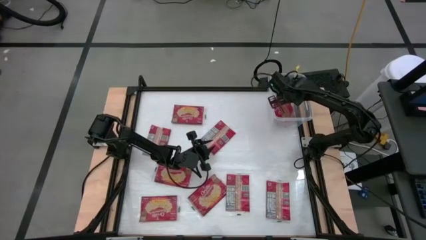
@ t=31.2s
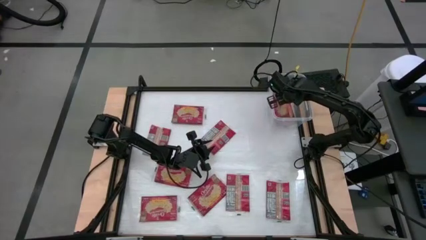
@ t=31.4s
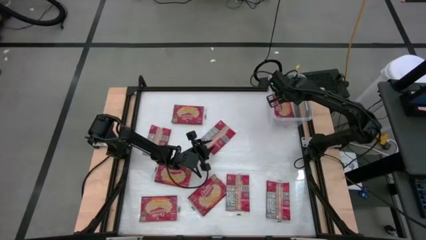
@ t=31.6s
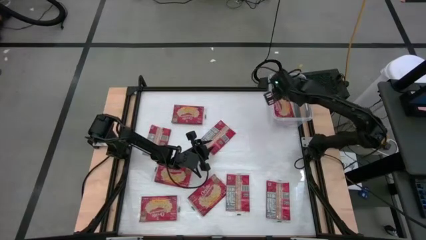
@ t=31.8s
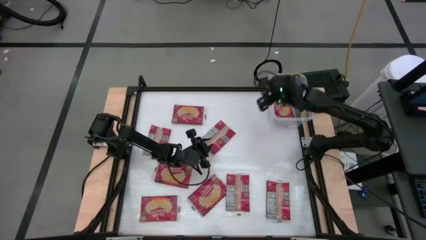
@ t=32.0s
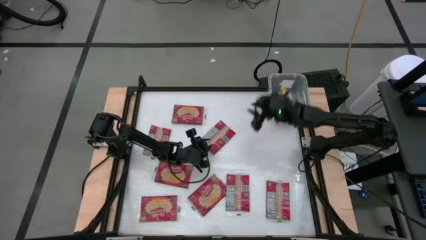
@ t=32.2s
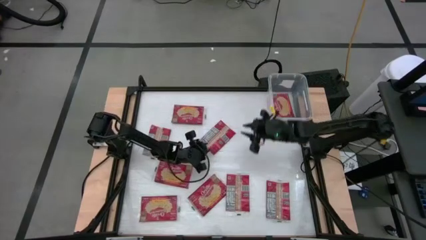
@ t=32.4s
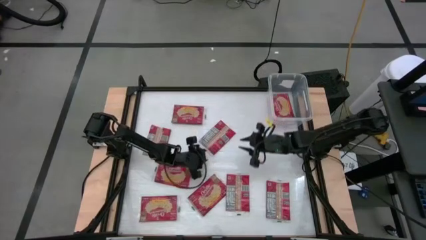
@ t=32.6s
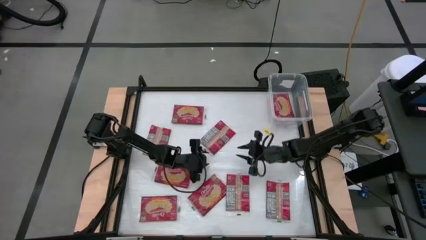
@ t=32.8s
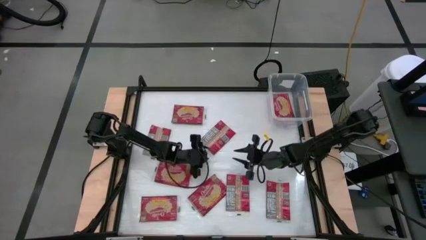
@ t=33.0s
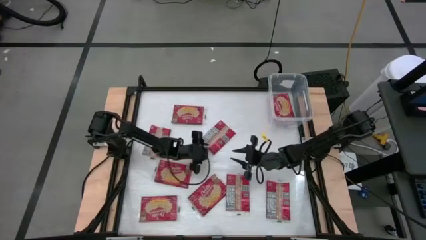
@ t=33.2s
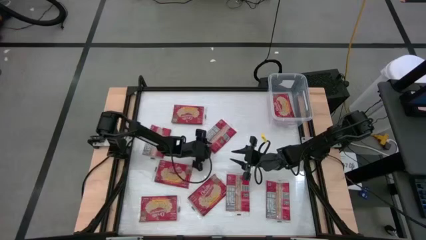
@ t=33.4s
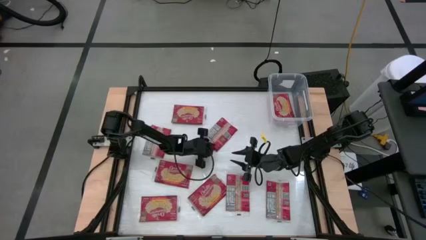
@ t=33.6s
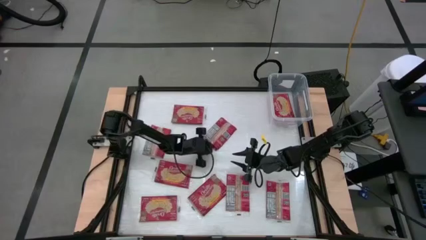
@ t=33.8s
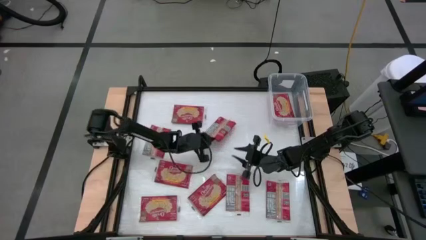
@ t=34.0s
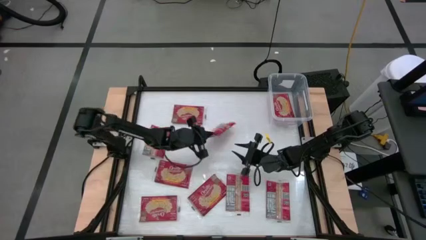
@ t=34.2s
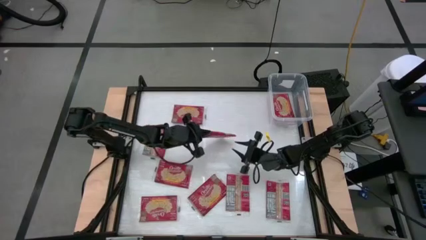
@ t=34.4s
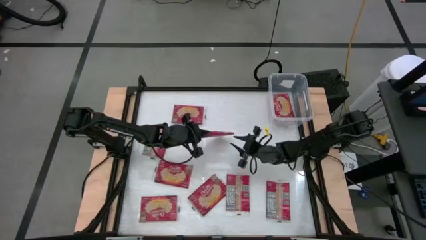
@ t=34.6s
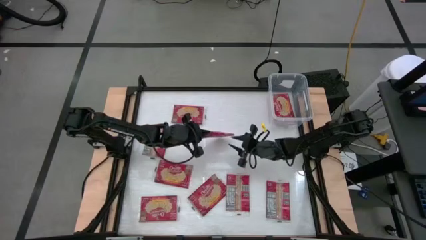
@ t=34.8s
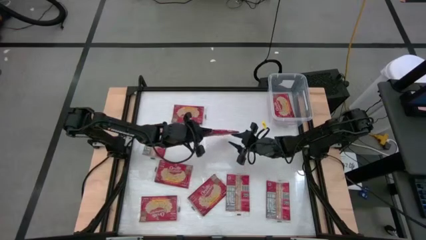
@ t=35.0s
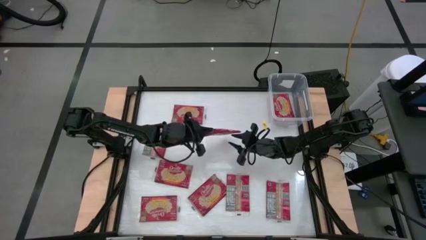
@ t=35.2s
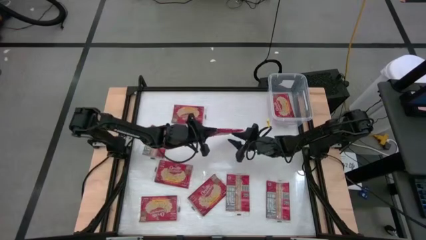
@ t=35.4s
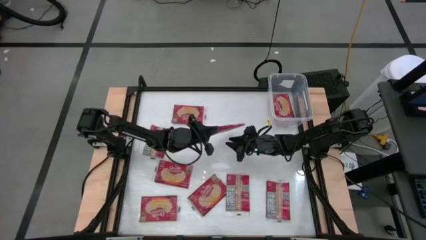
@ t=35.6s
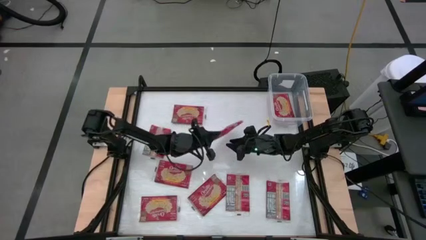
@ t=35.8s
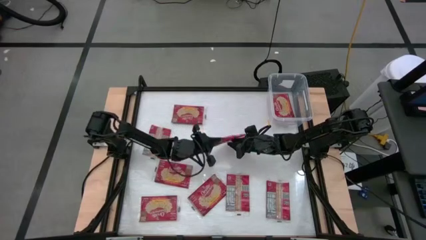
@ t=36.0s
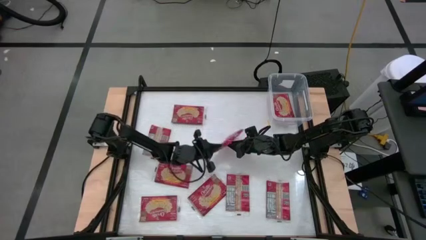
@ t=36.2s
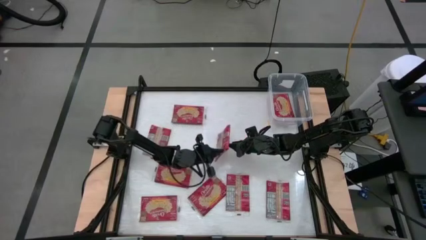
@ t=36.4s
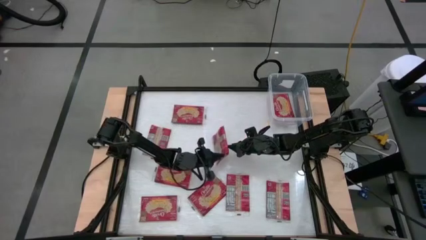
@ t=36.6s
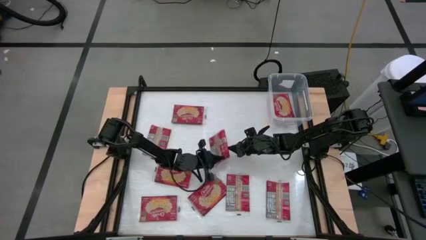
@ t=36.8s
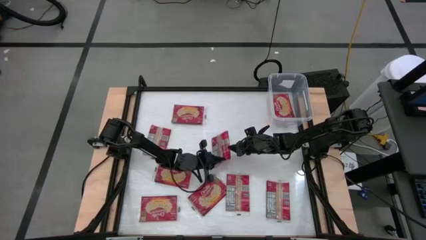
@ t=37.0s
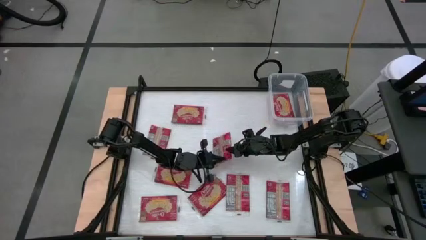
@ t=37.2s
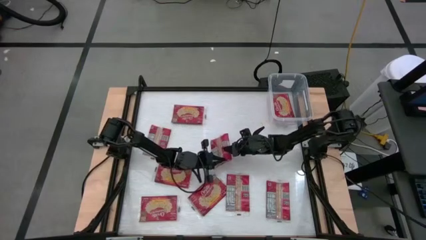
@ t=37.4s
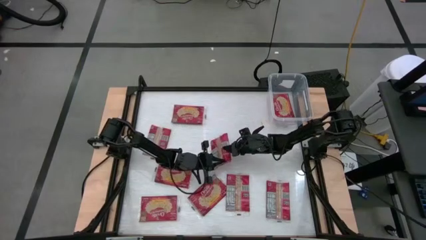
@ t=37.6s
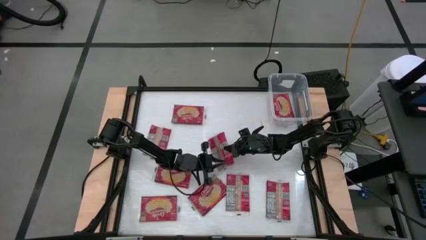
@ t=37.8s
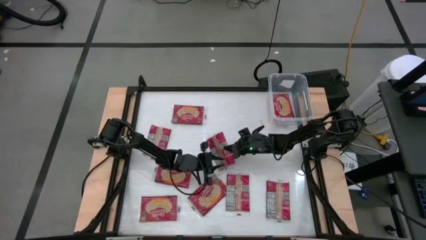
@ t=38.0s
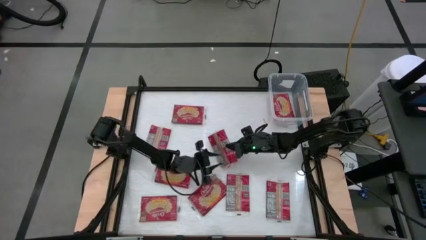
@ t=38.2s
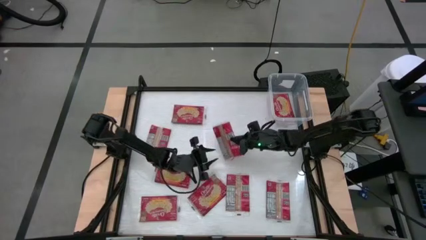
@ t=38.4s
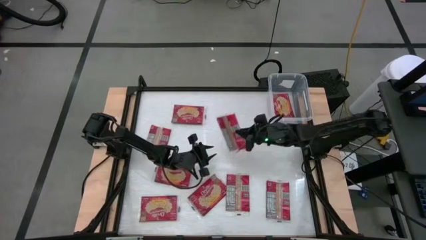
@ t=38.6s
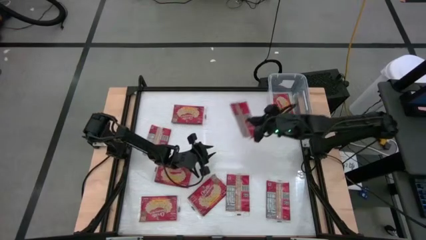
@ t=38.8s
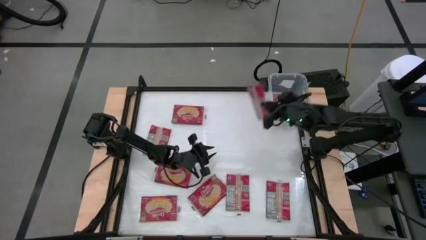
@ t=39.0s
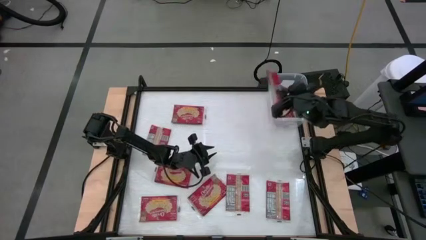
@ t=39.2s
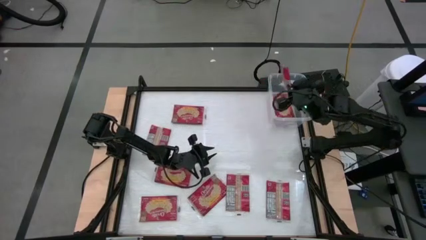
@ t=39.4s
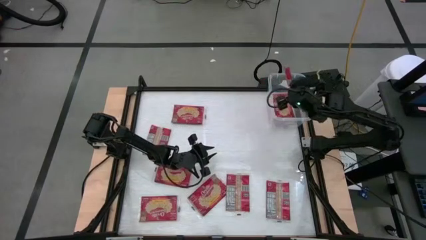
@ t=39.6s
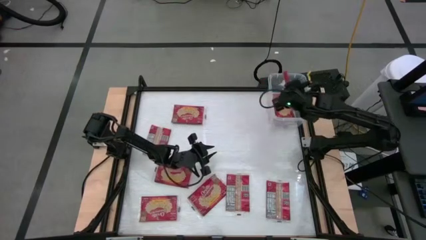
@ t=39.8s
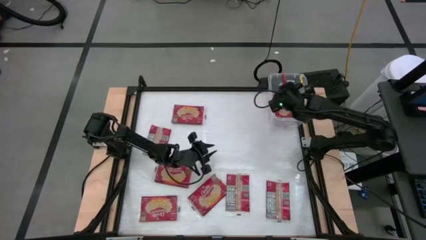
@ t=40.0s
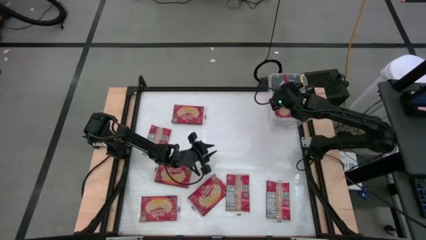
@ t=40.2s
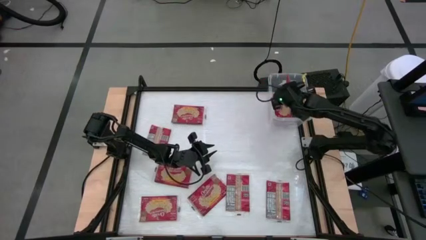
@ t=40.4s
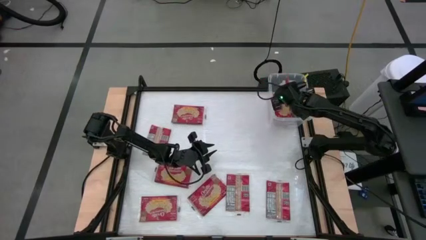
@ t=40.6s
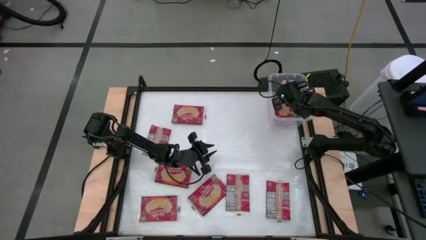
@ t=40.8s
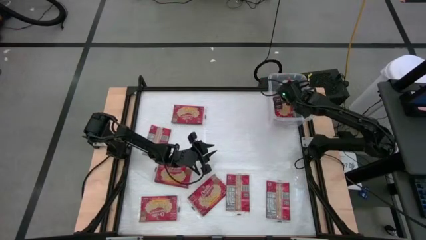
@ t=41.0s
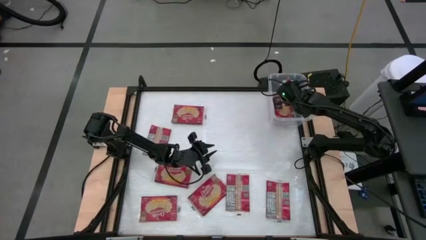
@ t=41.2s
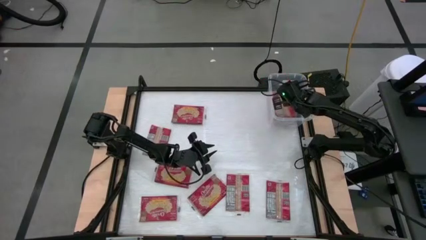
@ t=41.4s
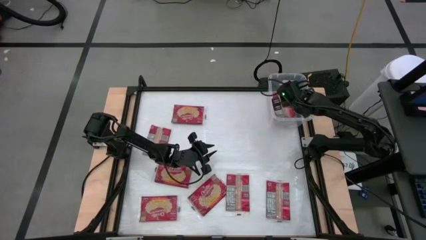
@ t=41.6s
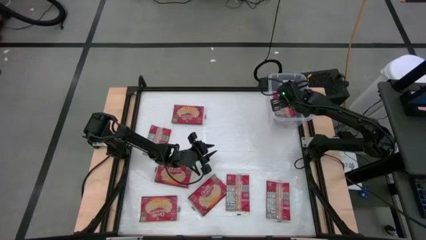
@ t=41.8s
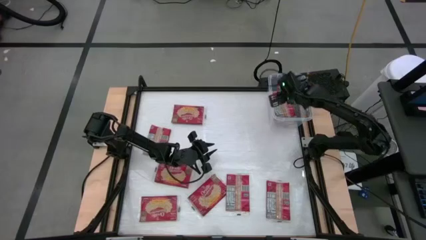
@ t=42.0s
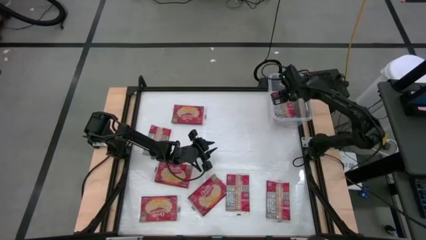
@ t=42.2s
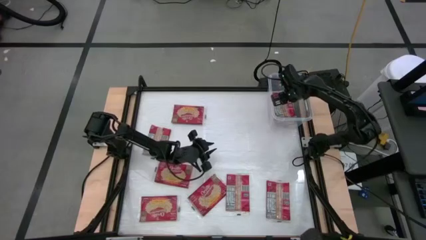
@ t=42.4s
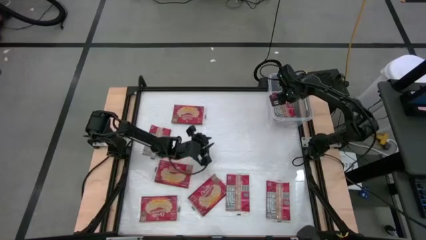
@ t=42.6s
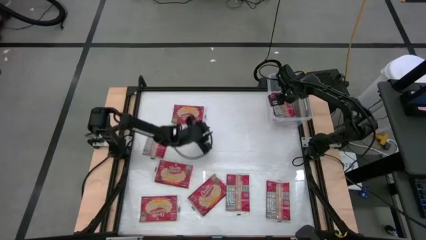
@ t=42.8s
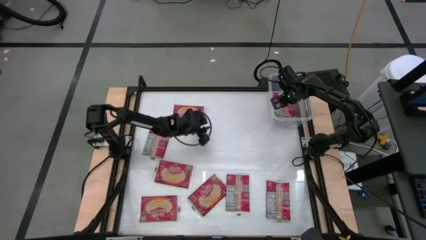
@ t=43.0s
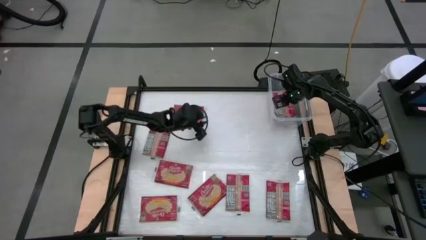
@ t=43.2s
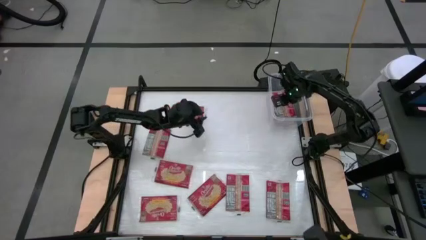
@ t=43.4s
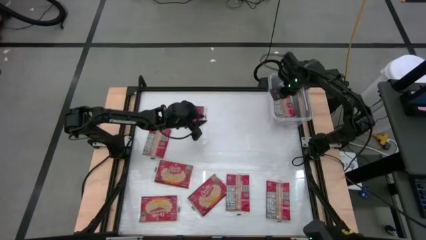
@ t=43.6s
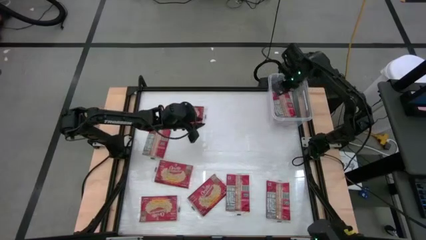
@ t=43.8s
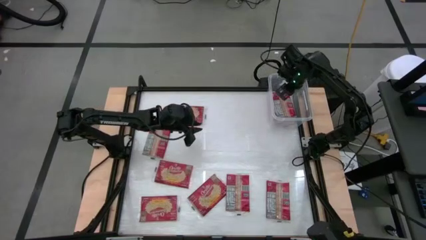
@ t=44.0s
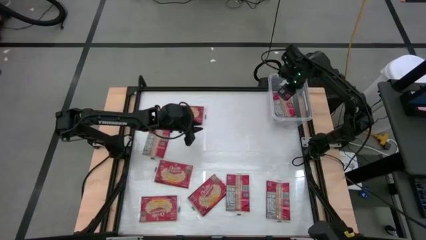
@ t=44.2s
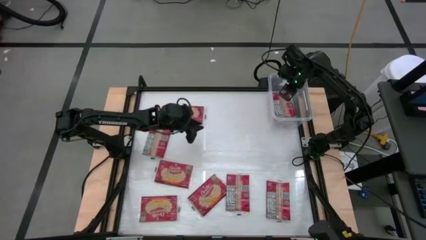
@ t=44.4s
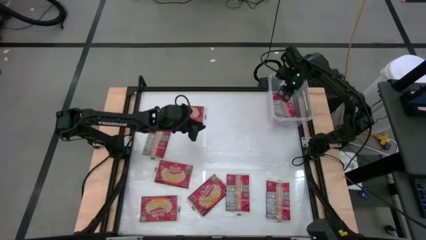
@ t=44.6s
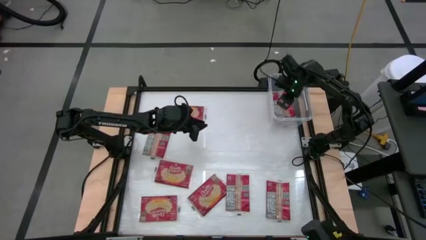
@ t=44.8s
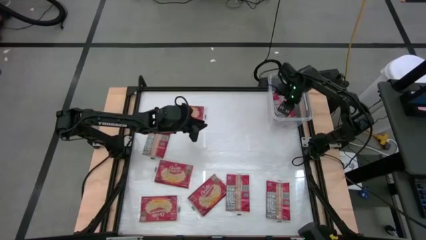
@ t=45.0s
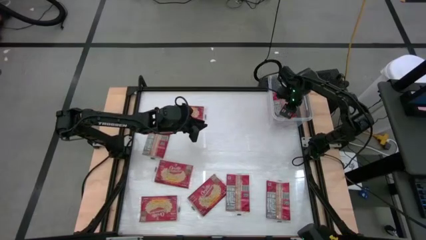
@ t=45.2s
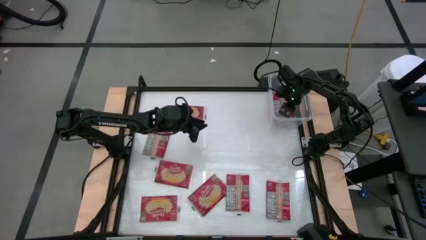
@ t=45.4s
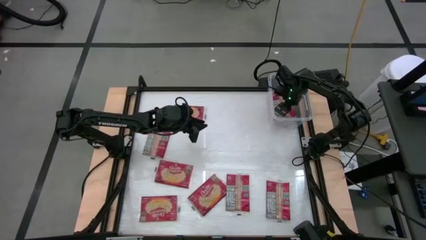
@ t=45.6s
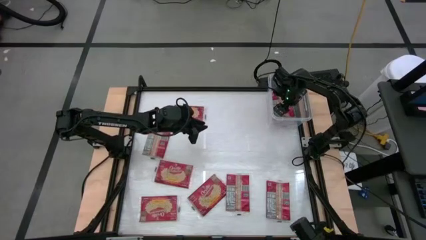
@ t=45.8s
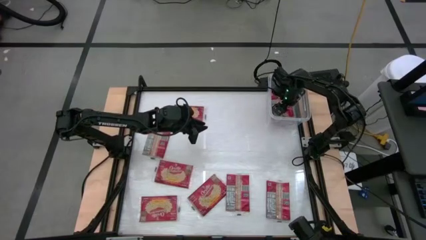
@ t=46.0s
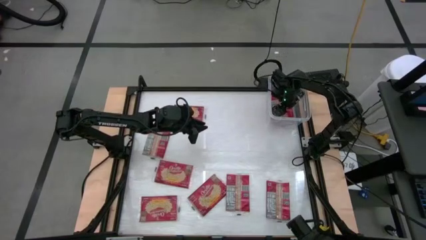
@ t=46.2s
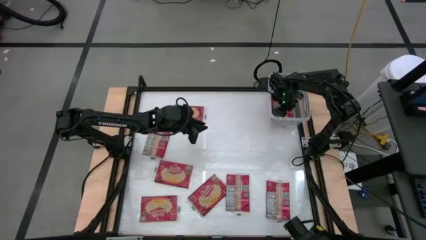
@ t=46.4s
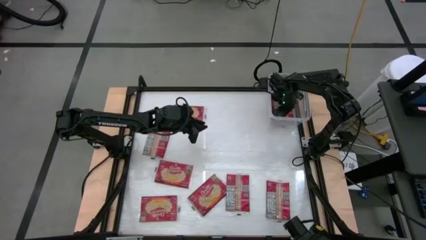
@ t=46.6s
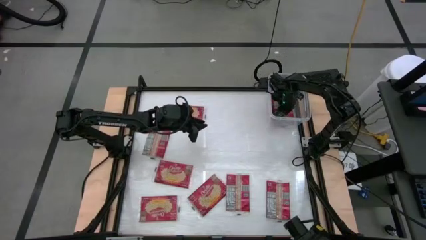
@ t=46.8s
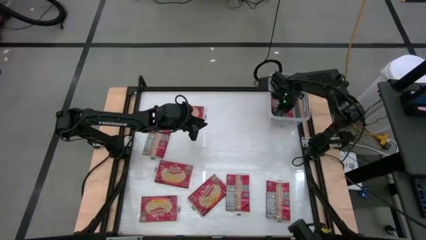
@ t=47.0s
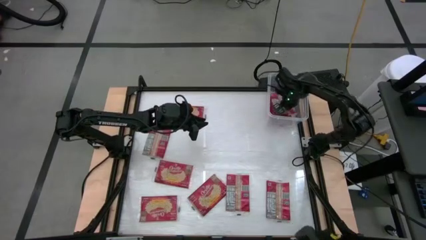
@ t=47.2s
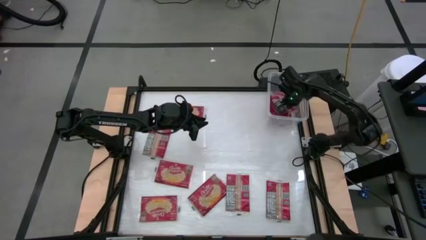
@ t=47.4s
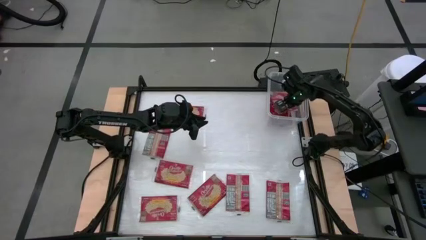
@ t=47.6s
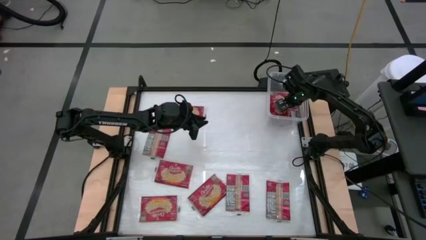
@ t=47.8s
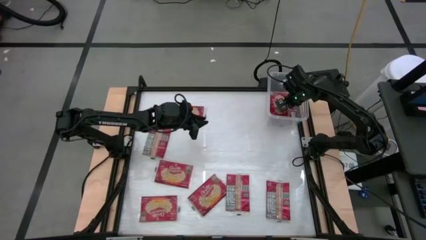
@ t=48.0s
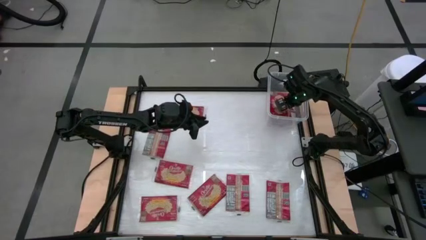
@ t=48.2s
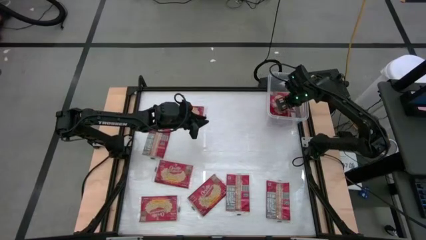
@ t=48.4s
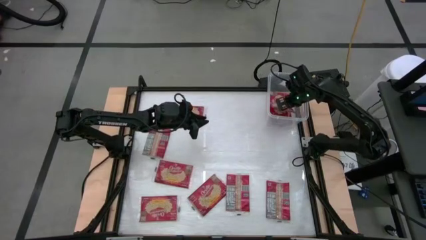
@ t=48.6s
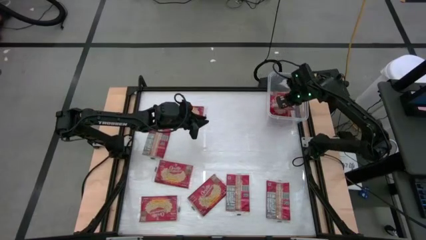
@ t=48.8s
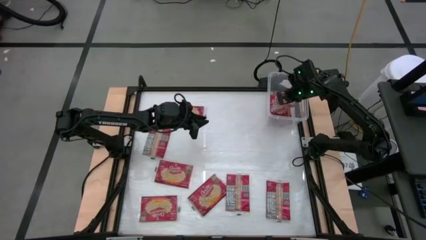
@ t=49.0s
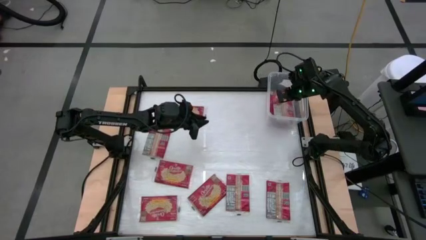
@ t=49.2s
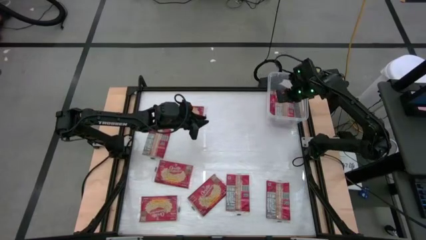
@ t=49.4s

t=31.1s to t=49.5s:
Task: Sort popcorn bags into baskets
Put the red popcorn bag into the transparent container
